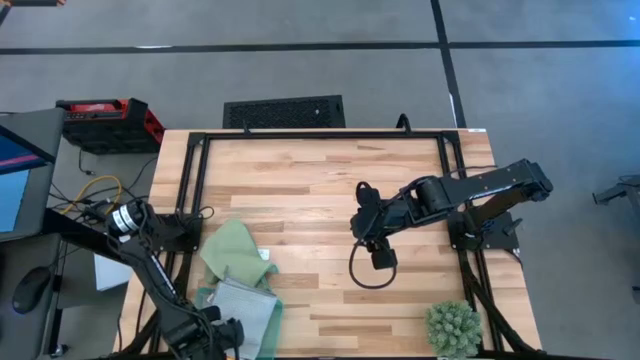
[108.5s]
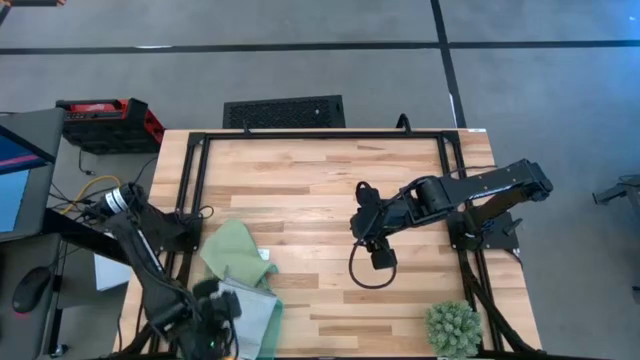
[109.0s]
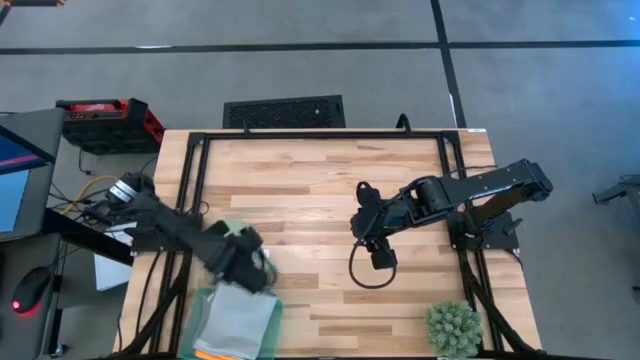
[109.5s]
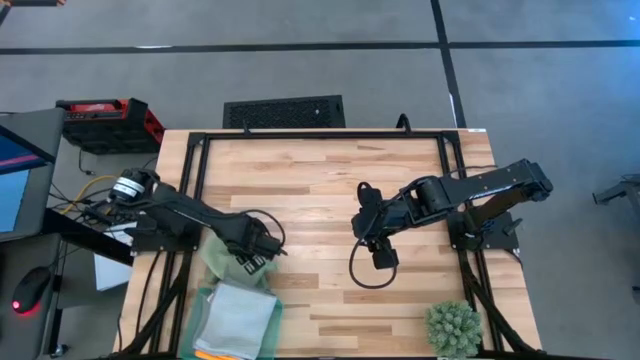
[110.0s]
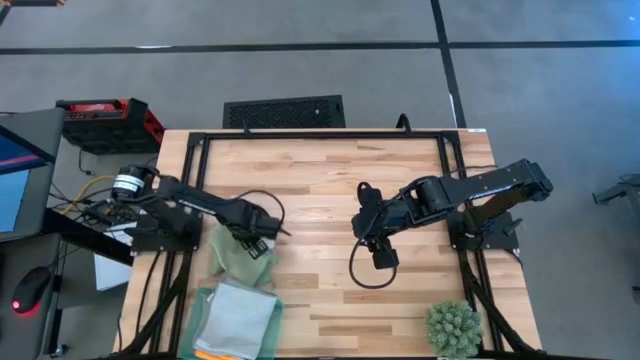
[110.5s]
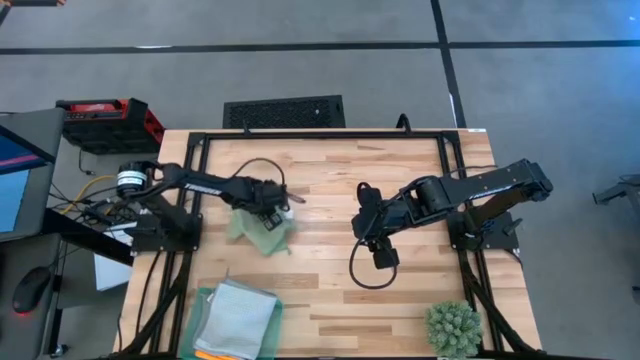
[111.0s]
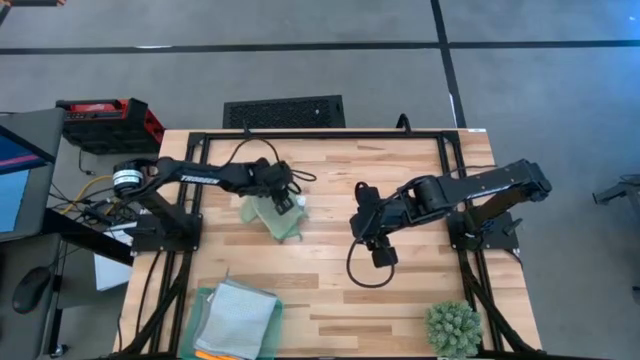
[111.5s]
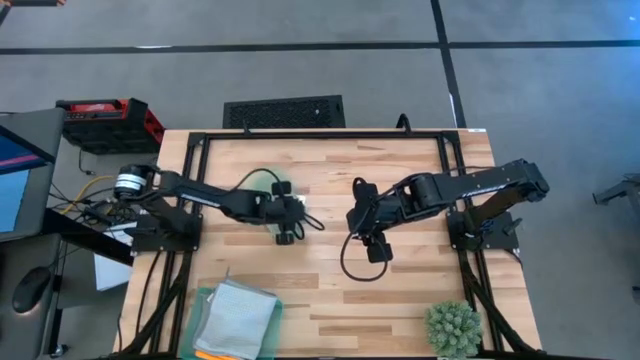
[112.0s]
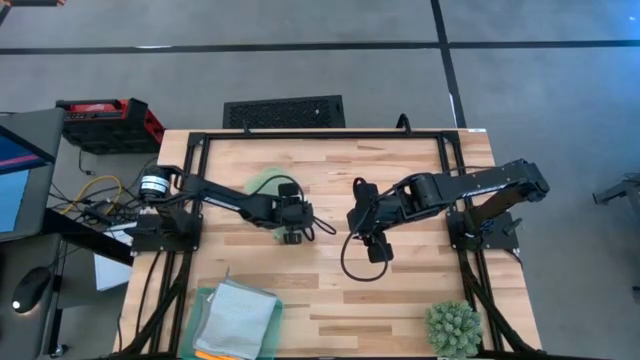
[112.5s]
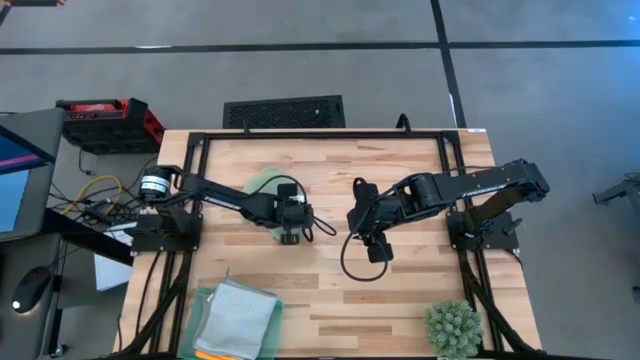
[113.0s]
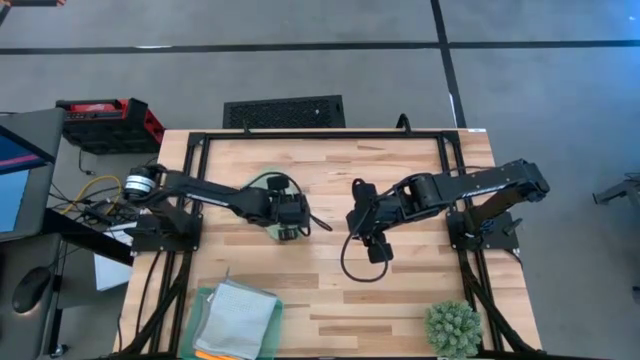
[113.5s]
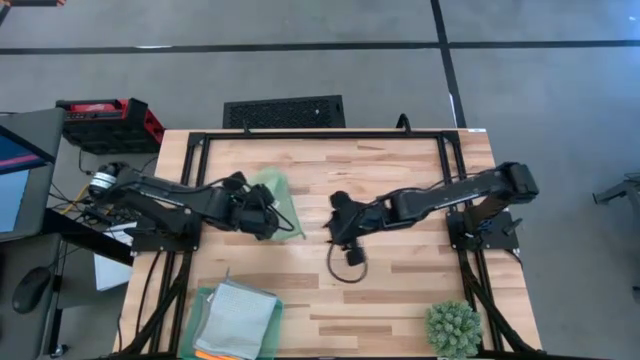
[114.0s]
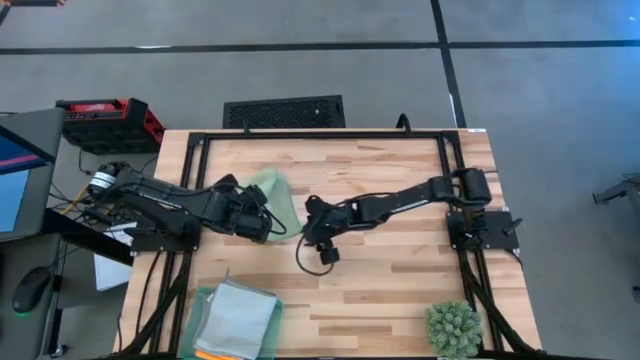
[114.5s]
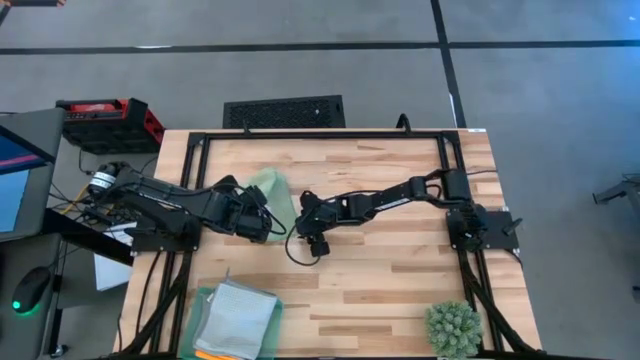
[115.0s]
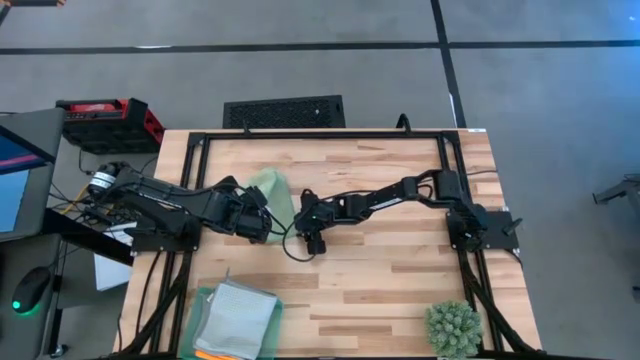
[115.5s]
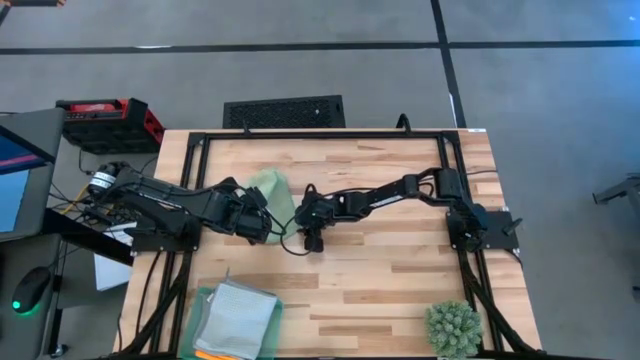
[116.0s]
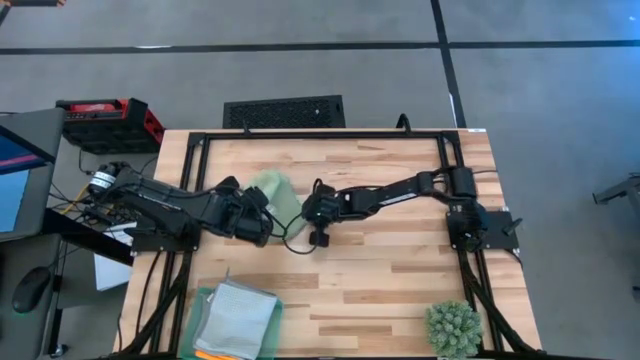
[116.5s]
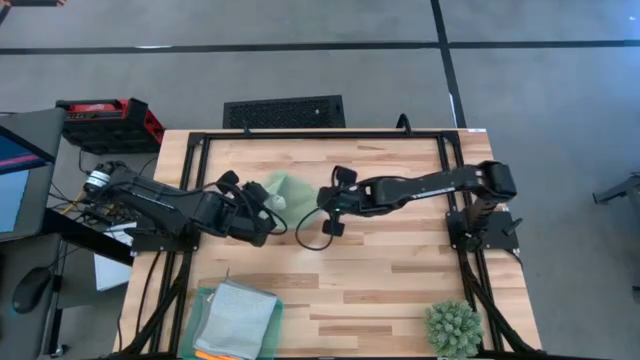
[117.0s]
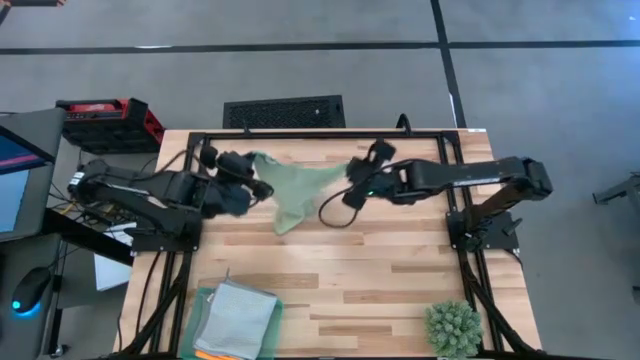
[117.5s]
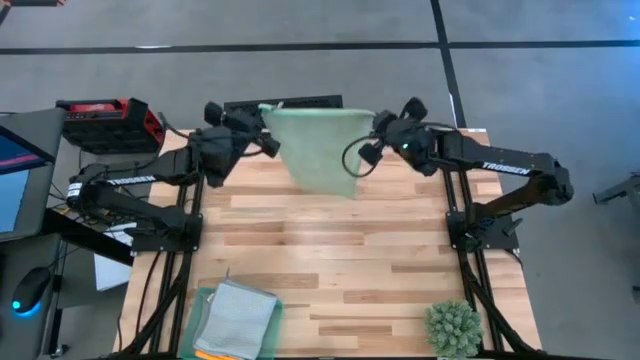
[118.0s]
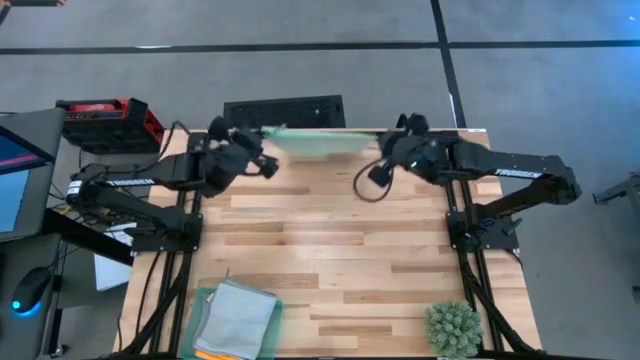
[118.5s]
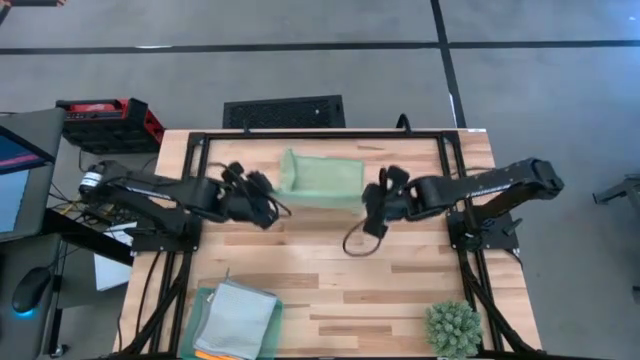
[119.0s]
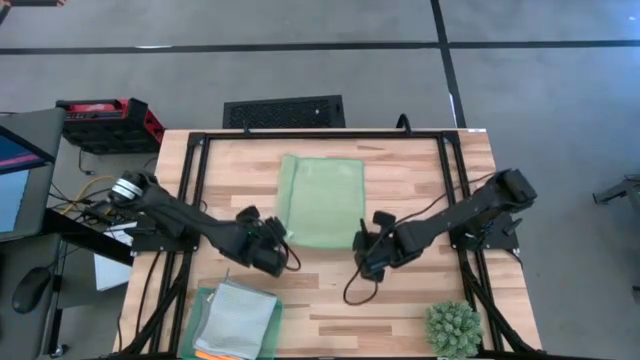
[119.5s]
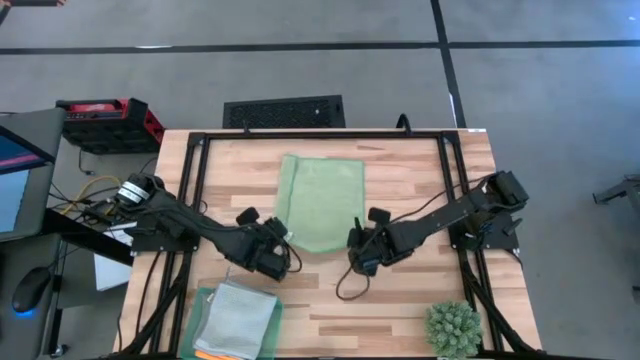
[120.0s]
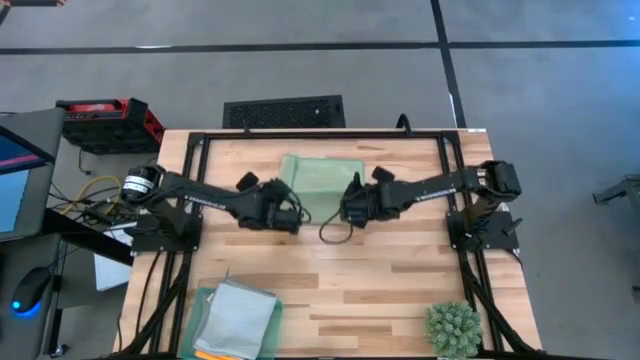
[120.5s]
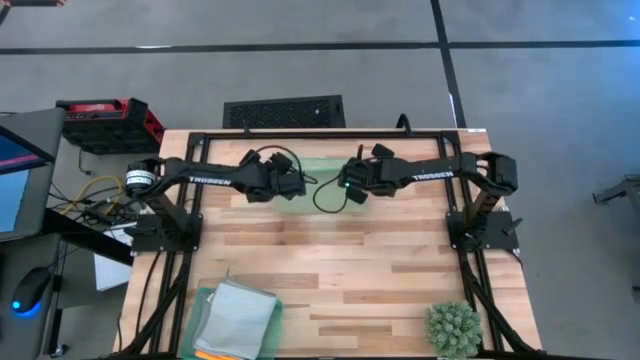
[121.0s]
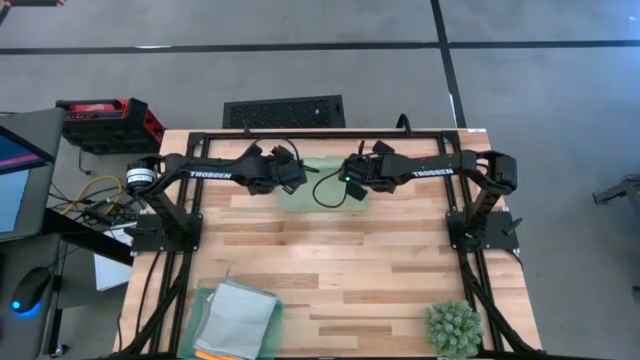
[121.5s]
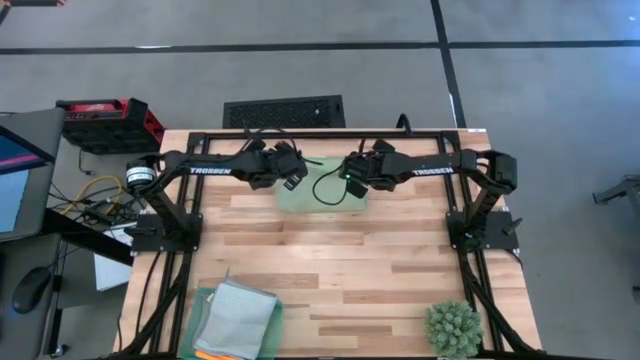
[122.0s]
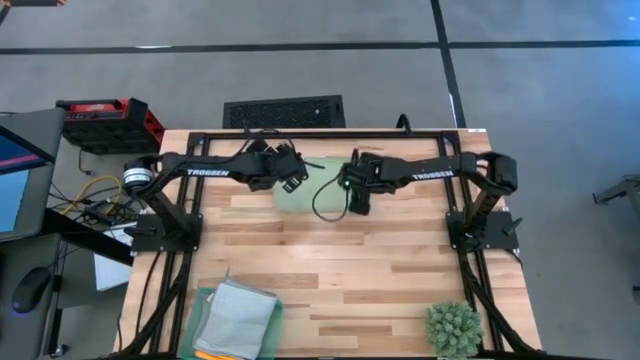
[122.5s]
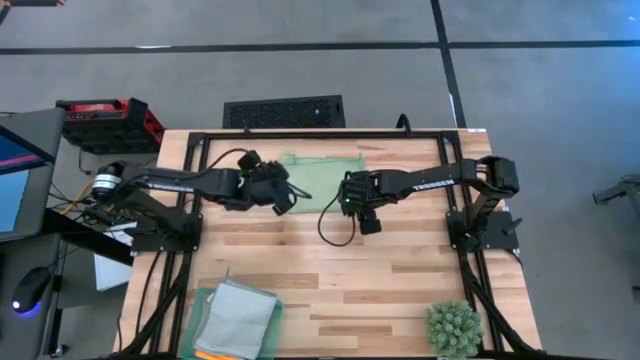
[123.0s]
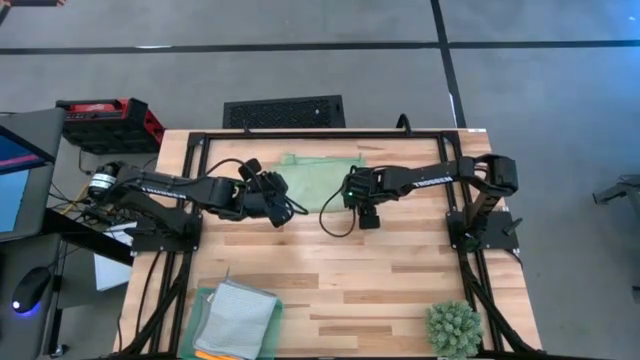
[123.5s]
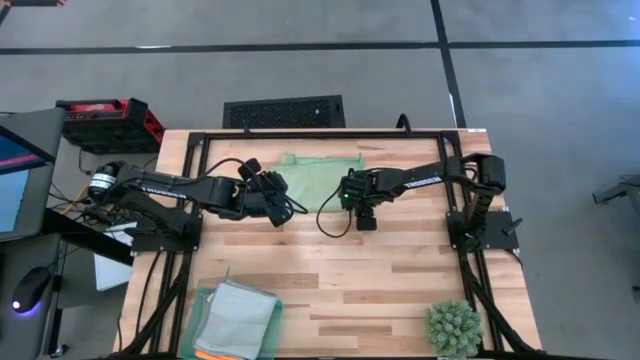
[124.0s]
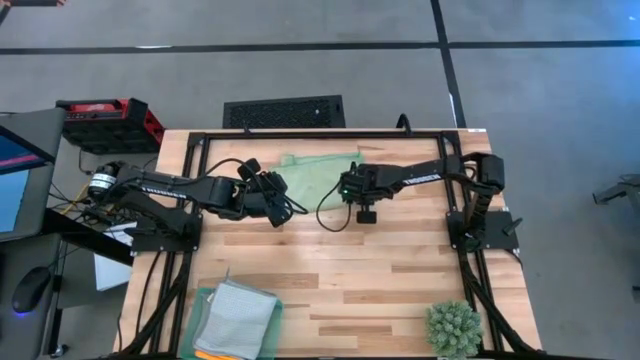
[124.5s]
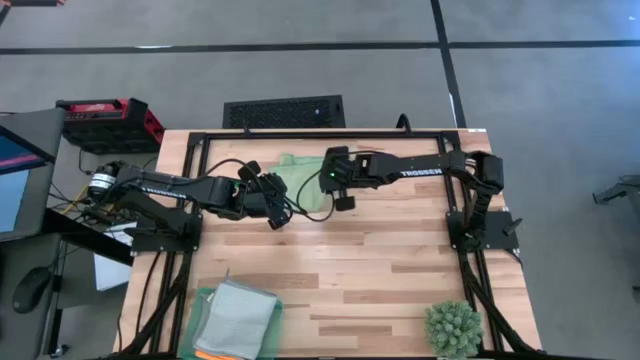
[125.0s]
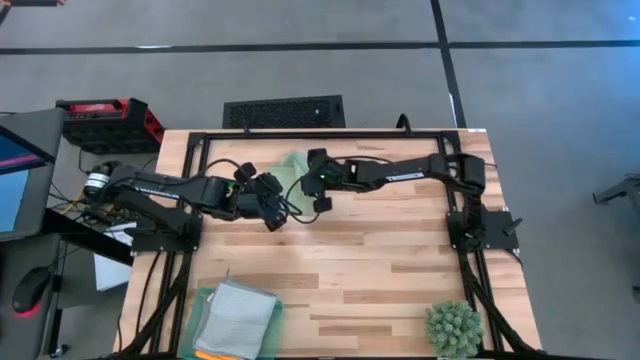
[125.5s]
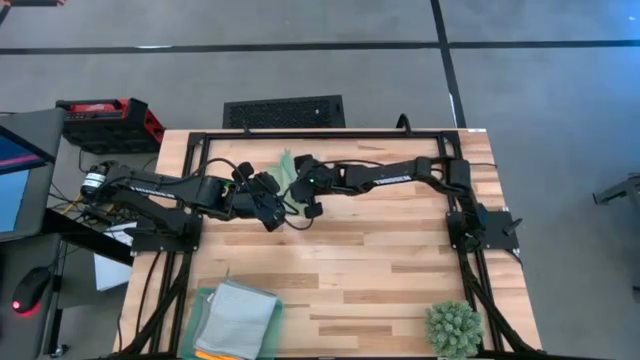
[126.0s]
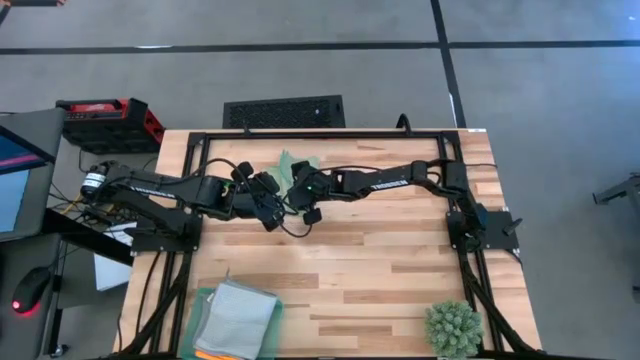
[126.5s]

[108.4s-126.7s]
Task: Fold microfiber towels
Fold the green microfiber cloth

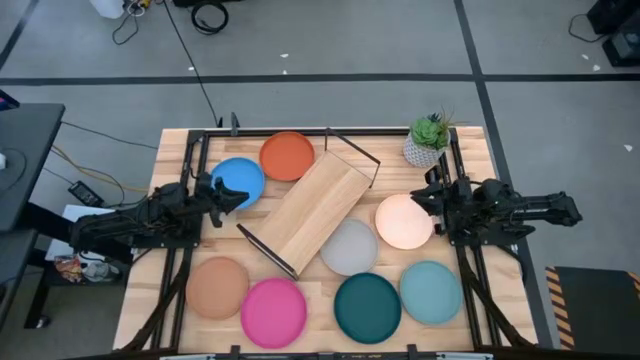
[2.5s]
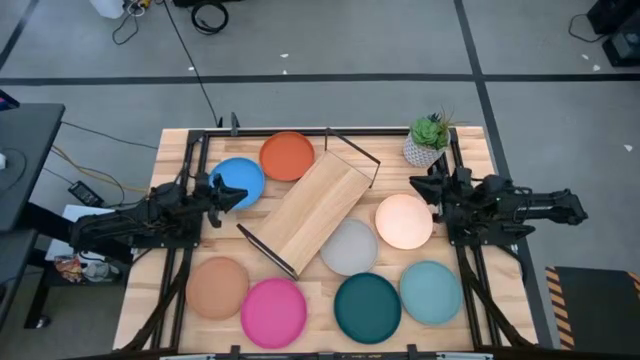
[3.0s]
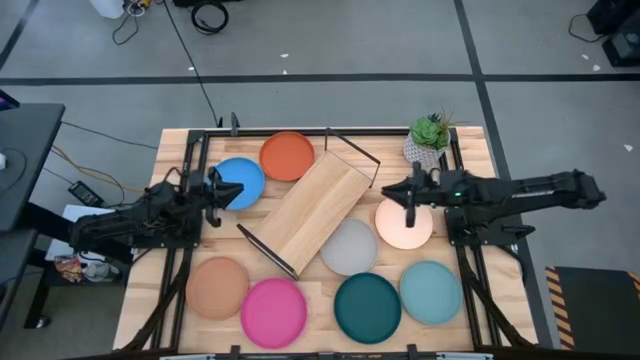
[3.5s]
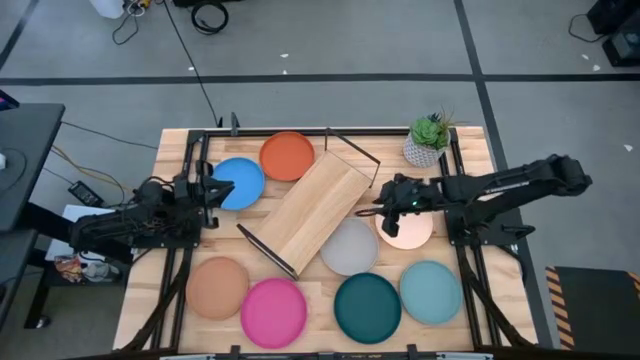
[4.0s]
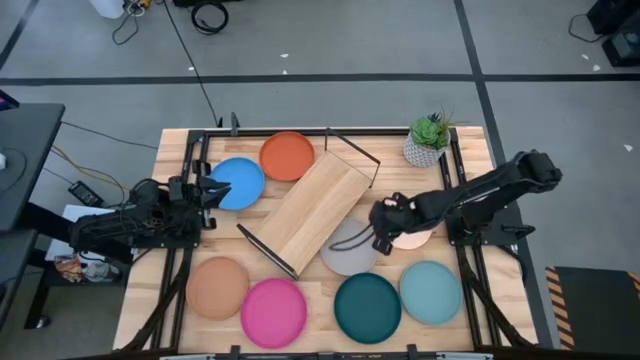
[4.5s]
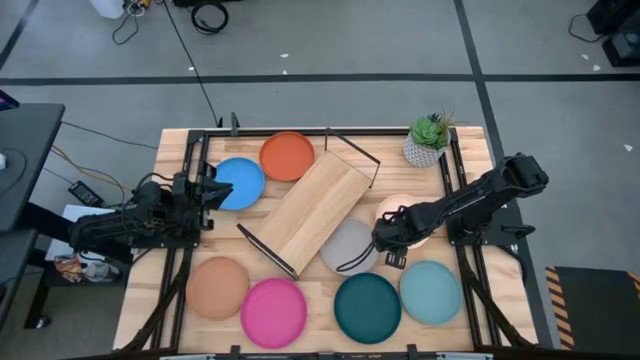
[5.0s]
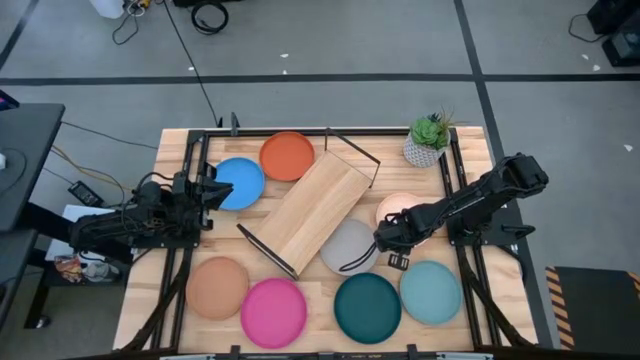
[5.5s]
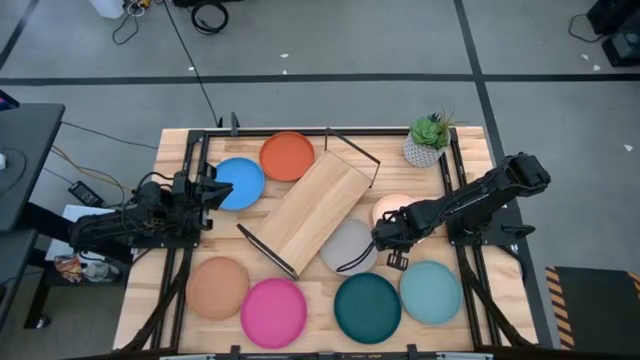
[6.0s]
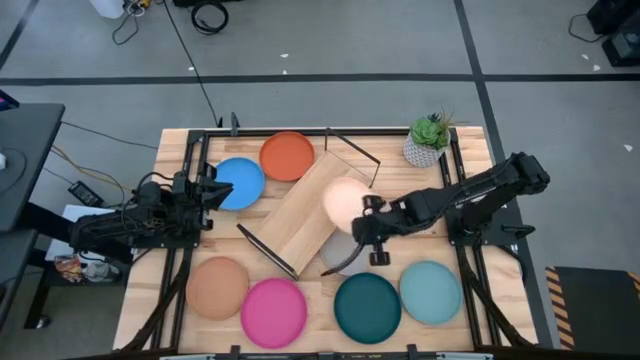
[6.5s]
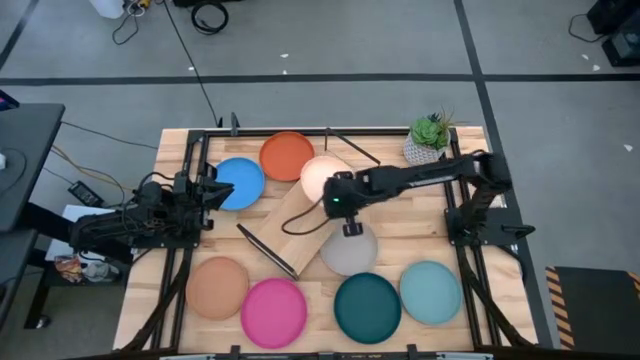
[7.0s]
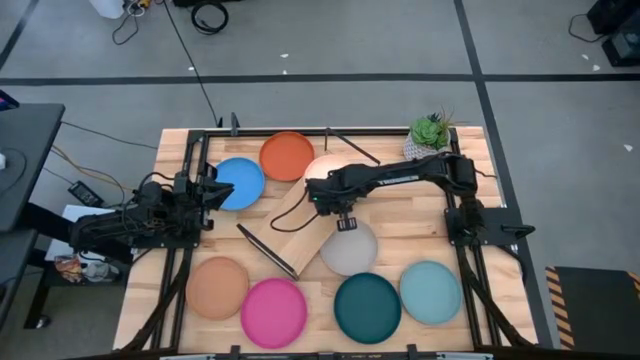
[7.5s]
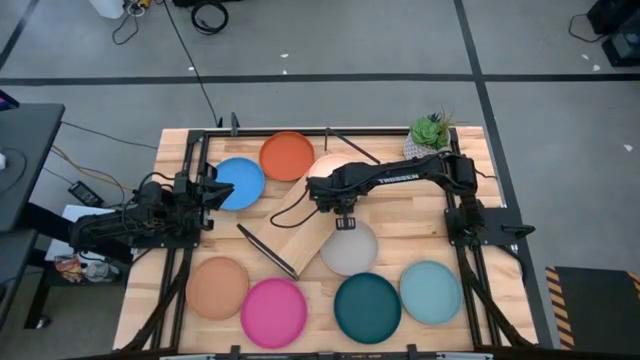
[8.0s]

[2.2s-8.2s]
Task: Place and stack plates onto a shelf
Put the beige plate on the shelf
